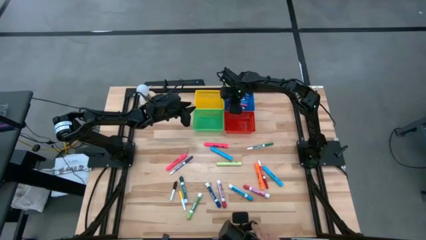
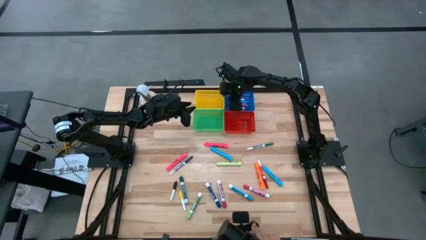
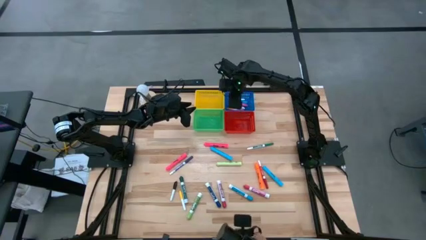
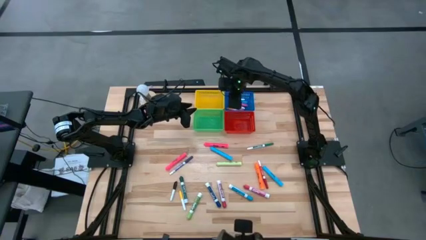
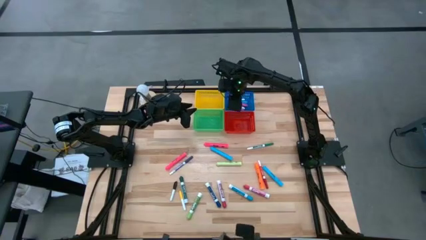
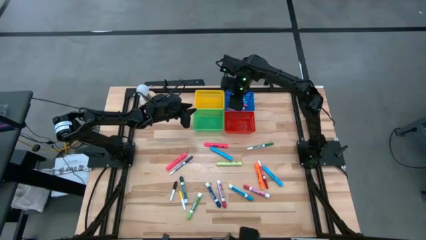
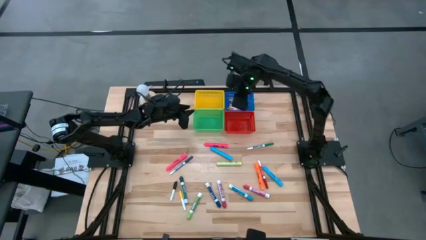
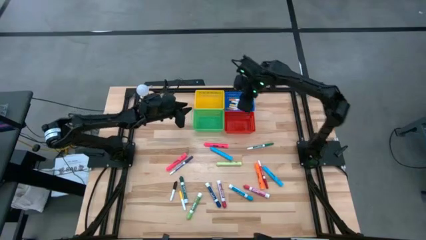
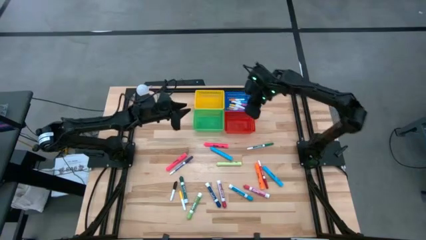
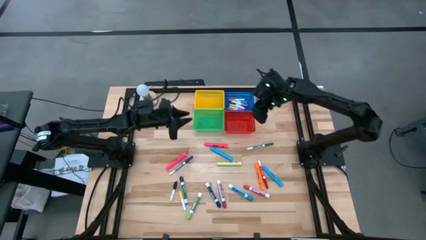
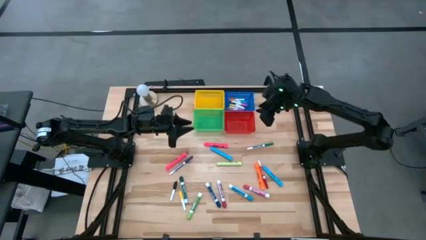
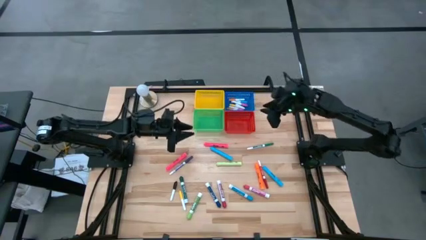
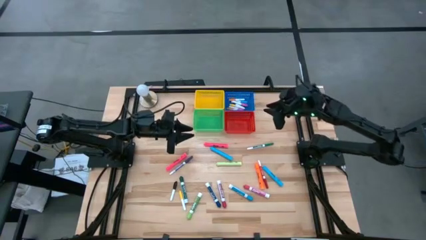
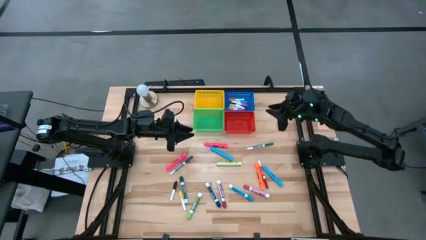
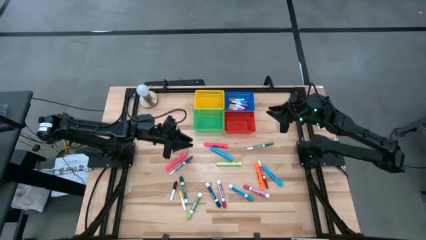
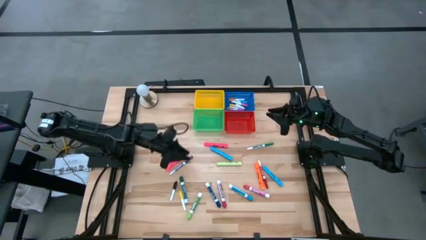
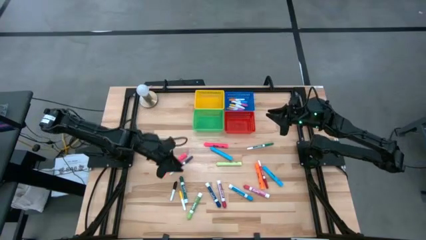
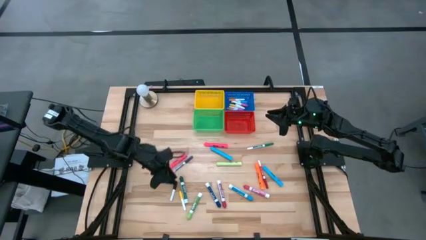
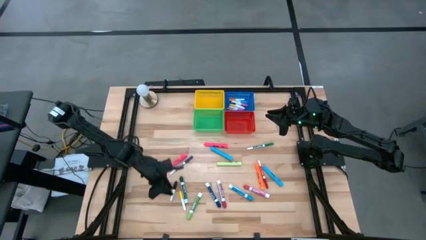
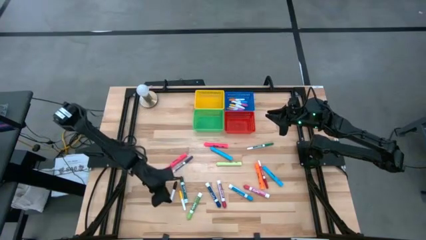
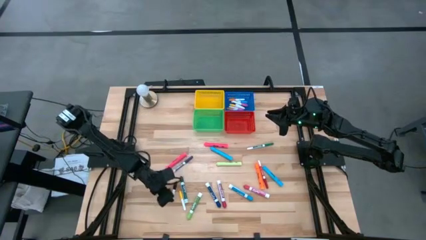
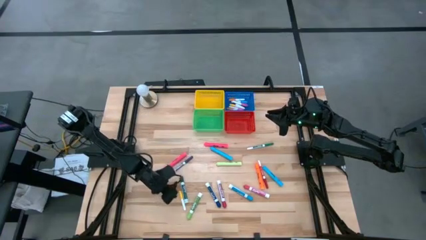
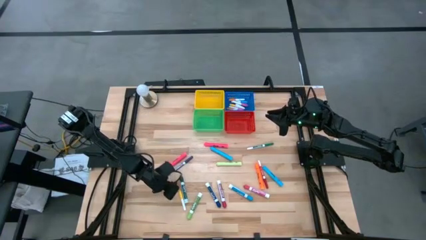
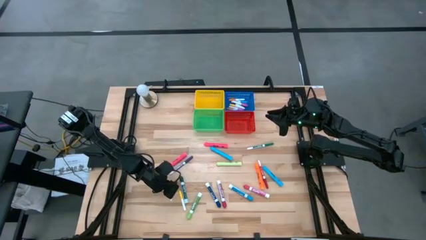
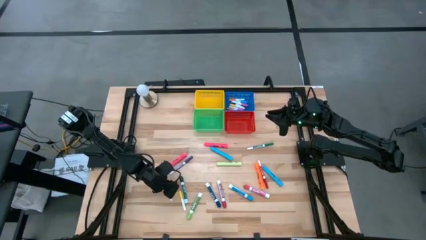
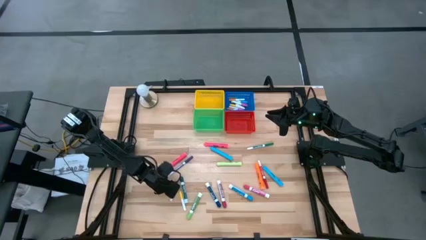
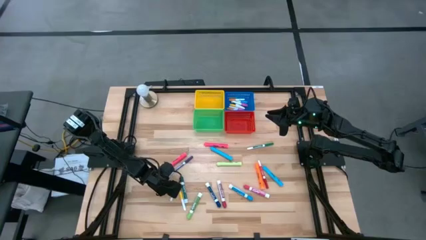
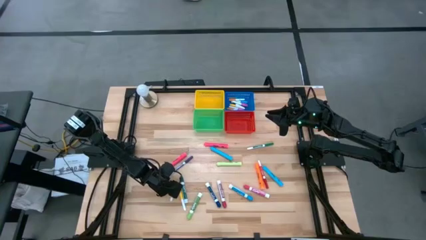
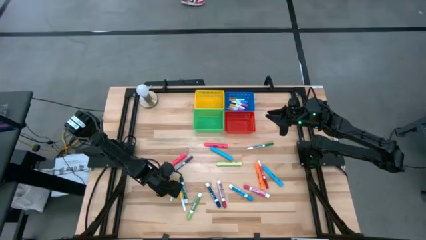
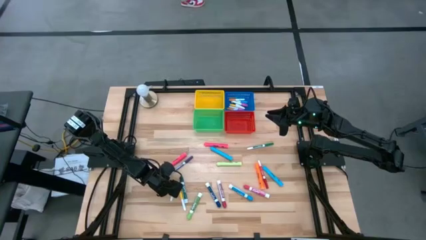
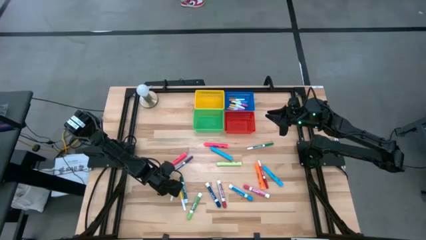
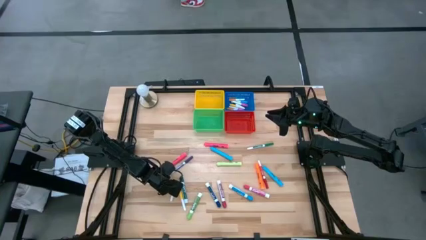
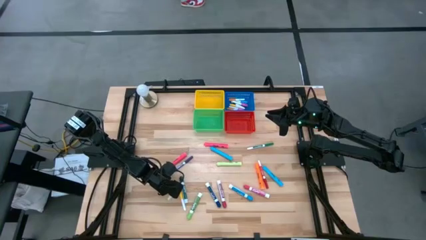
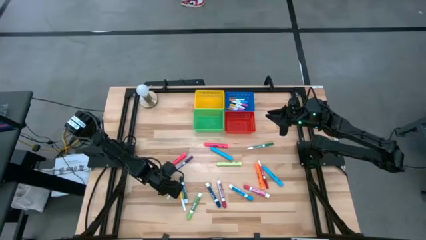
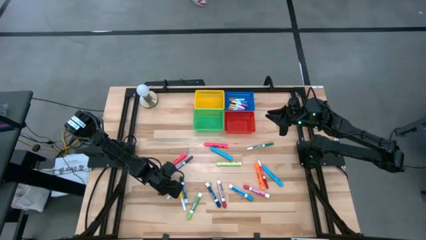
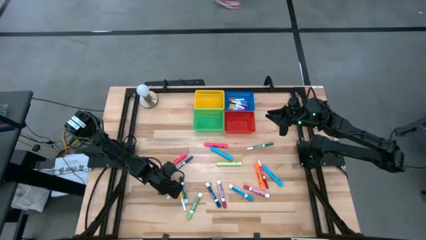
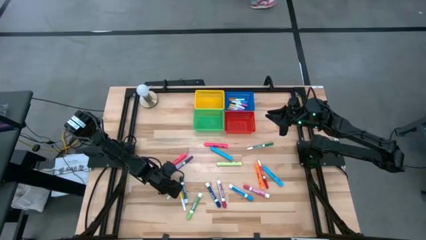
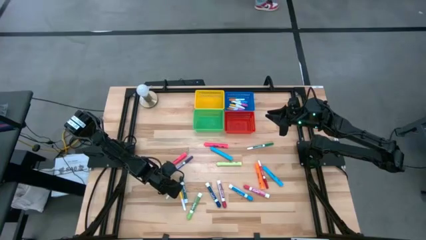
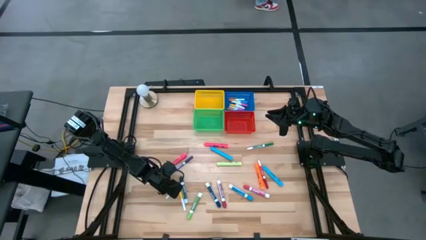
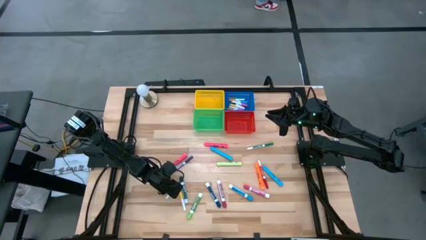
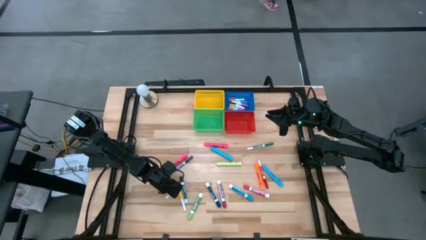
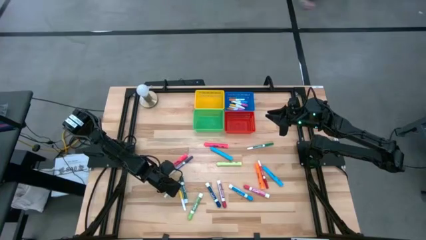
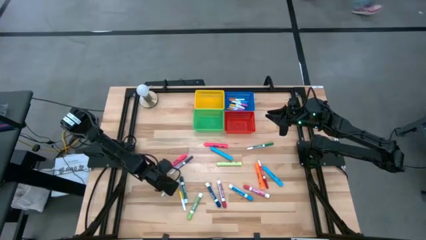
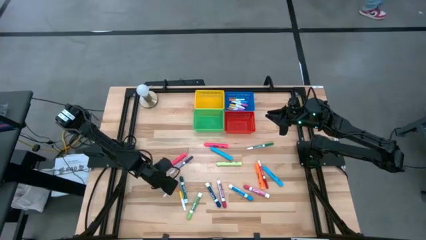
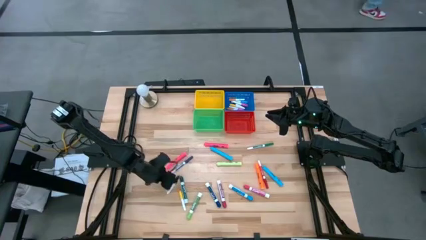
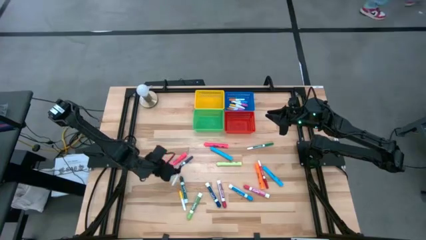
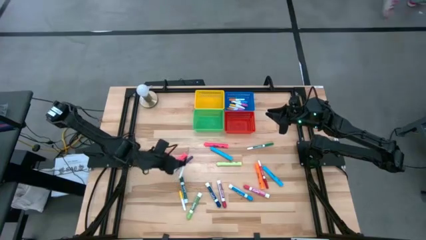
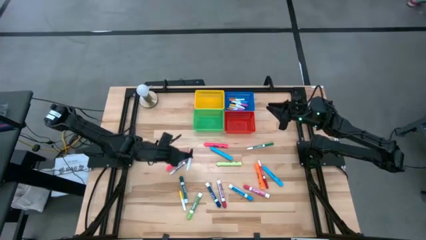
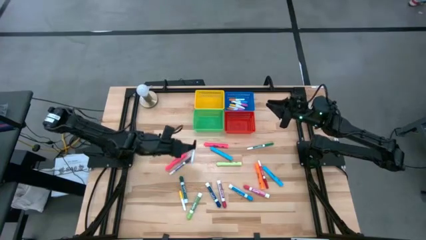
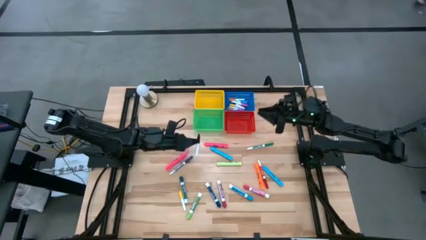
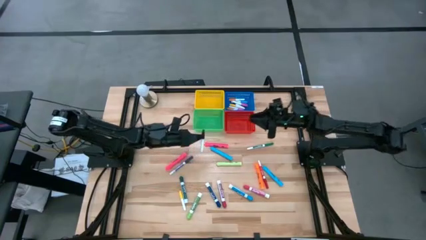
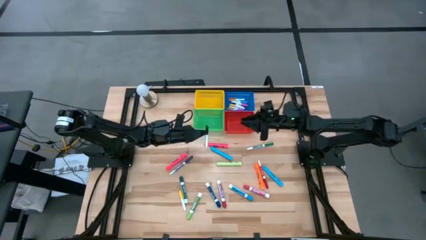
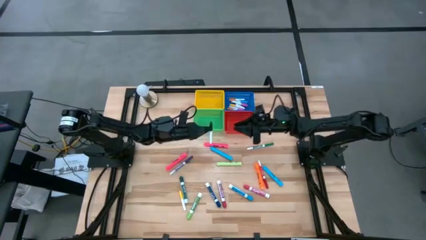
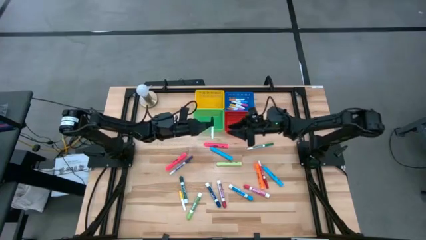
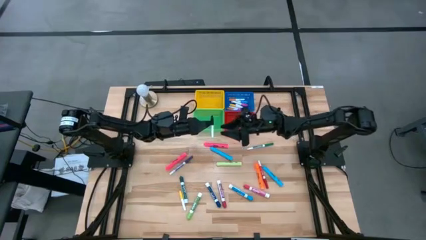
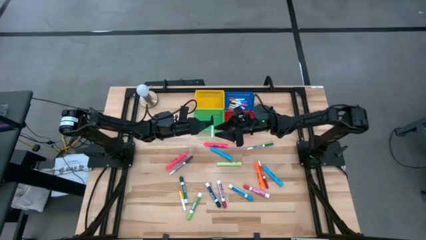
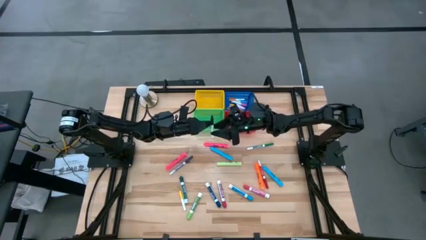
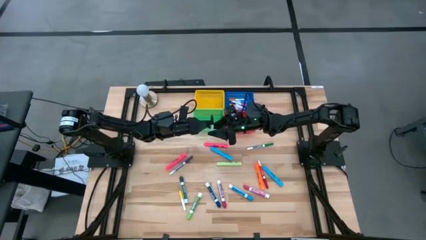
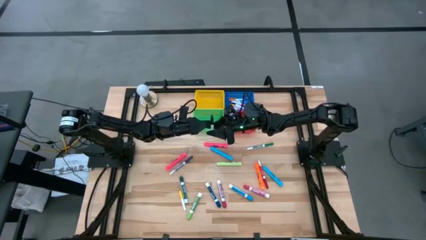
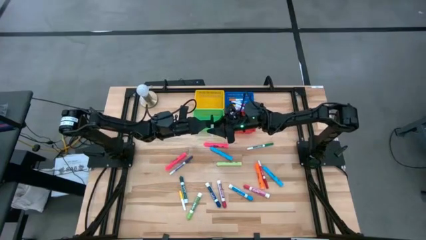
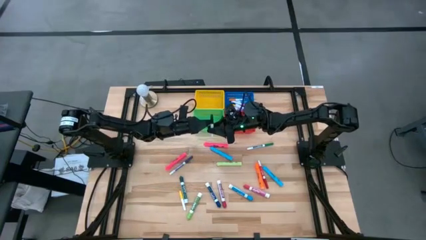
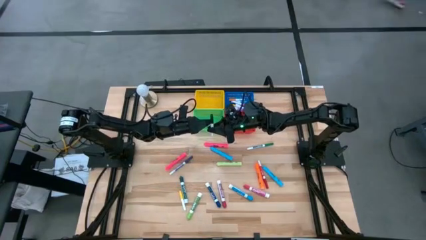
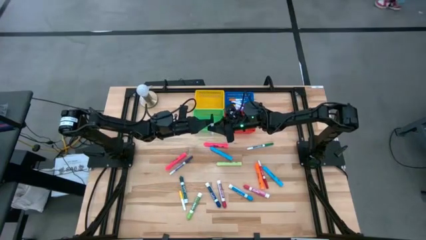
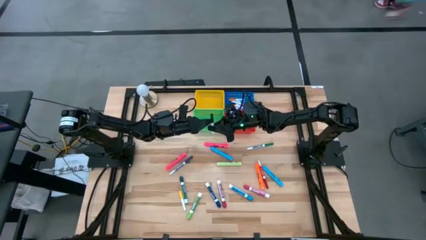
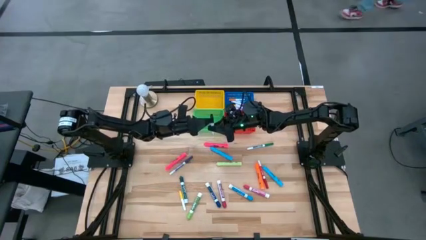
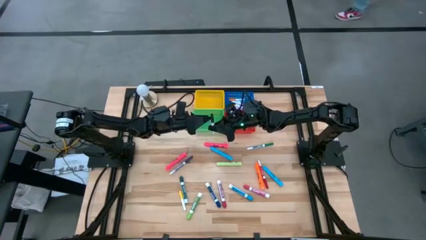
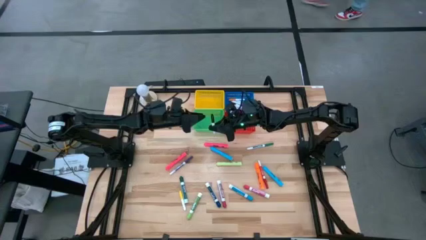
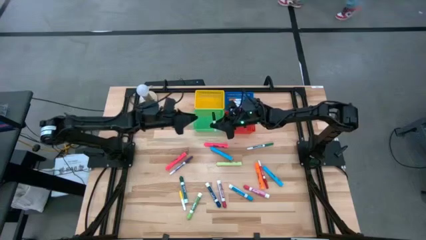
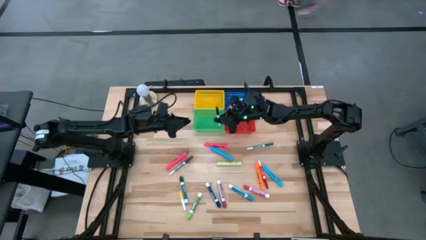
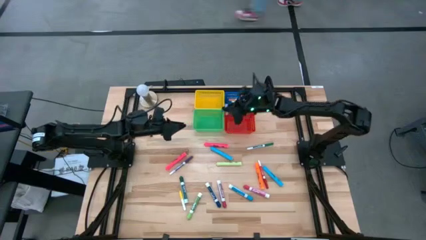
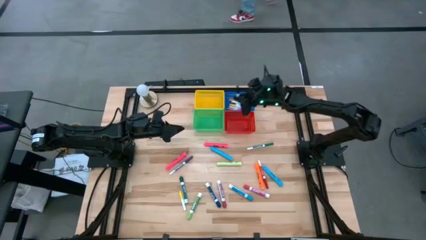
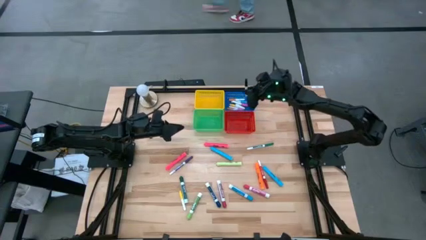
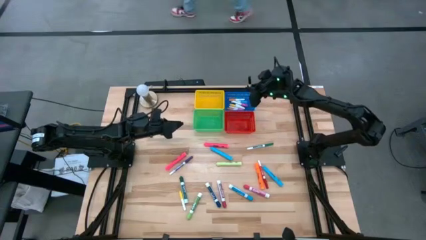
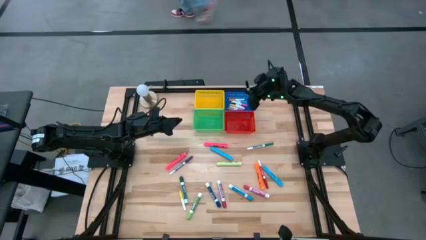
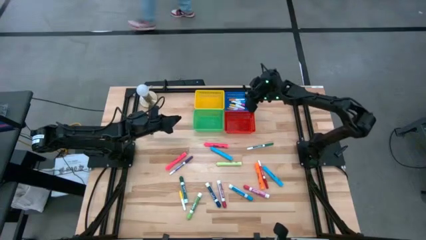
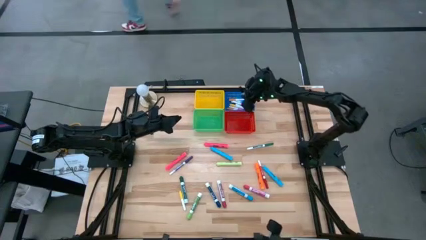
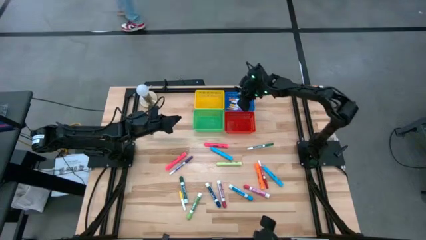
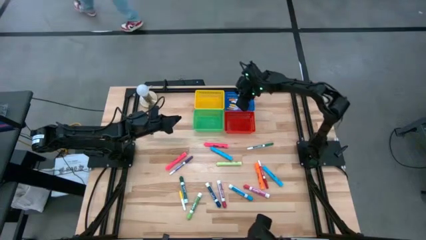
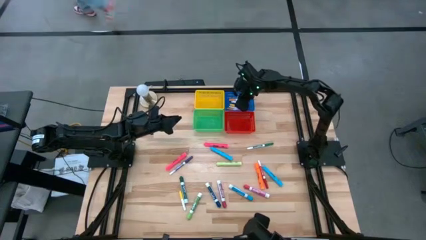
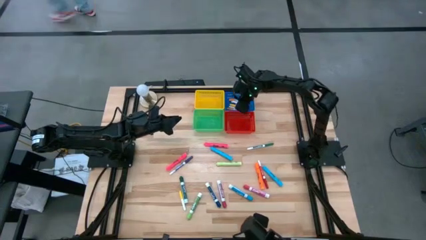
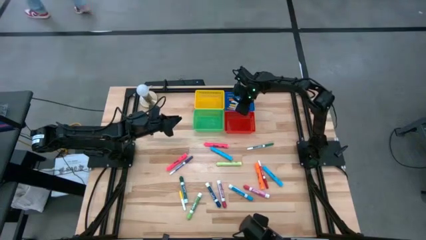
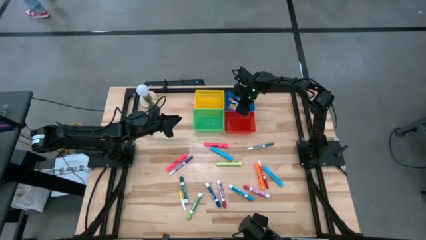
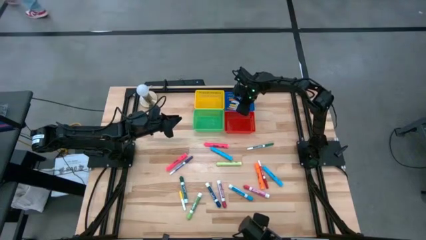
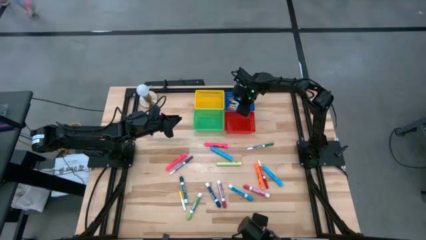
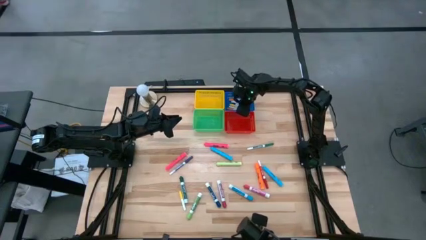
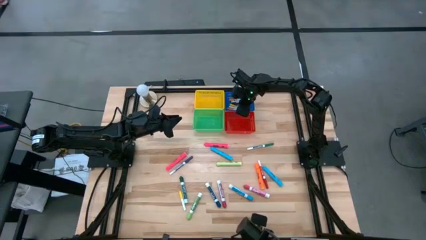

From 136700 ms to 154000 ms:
Task: Pick & Place Markers
Put the small black highlighter pen into the blue bin
